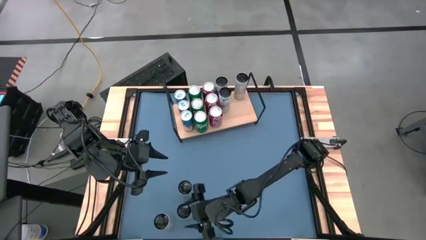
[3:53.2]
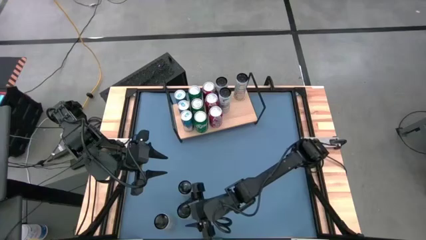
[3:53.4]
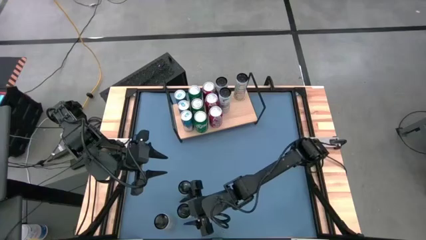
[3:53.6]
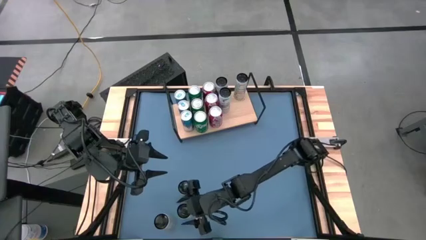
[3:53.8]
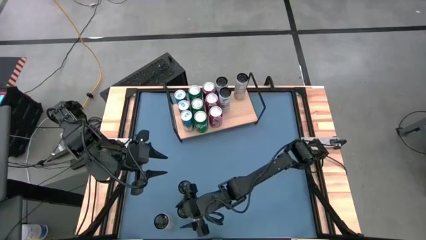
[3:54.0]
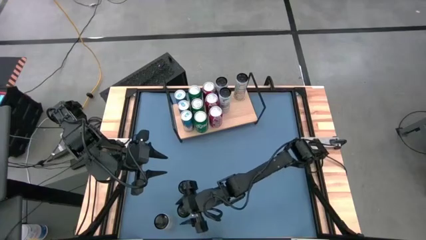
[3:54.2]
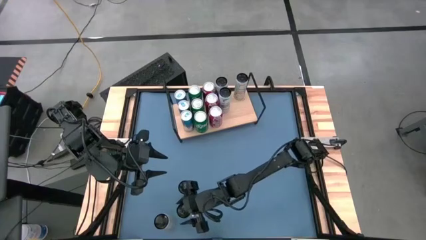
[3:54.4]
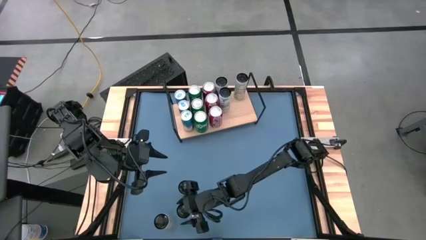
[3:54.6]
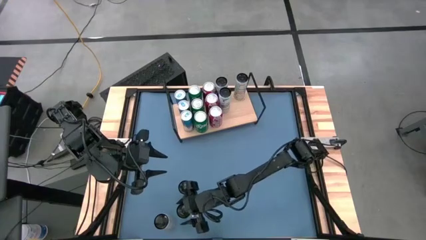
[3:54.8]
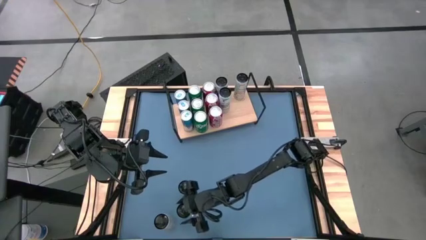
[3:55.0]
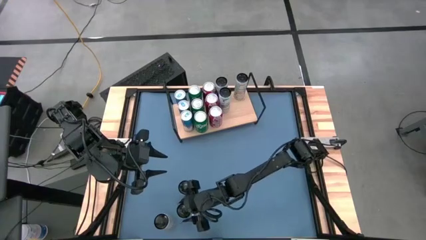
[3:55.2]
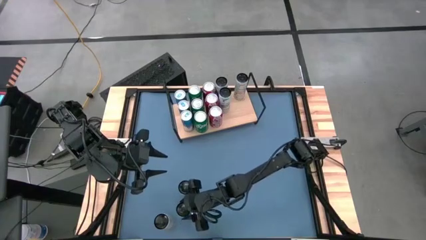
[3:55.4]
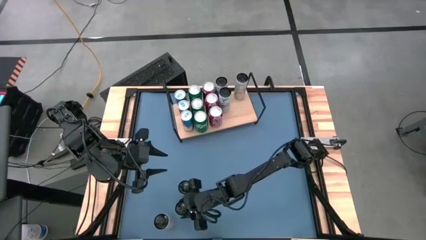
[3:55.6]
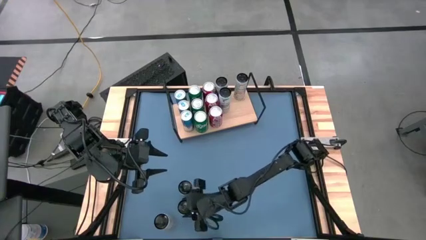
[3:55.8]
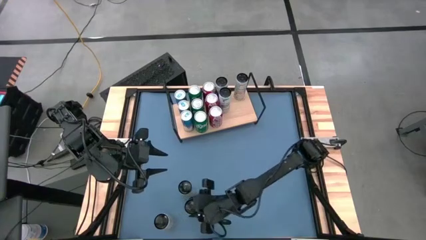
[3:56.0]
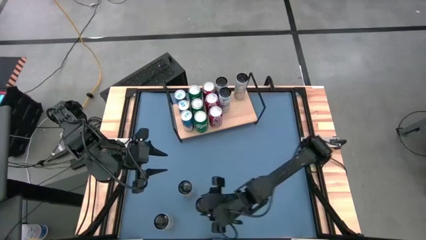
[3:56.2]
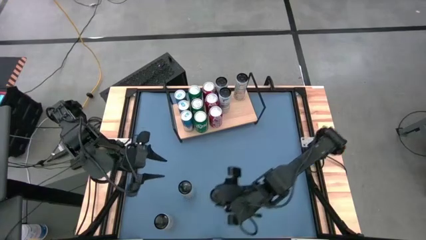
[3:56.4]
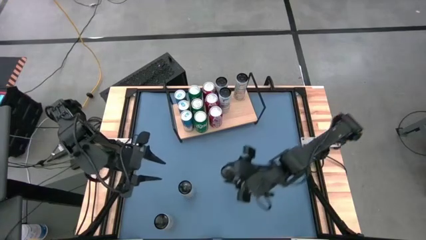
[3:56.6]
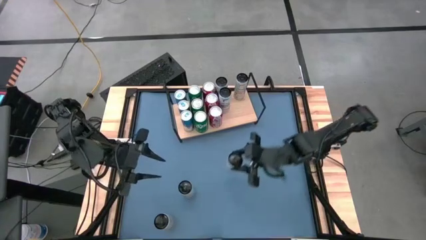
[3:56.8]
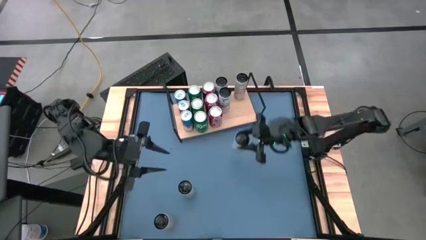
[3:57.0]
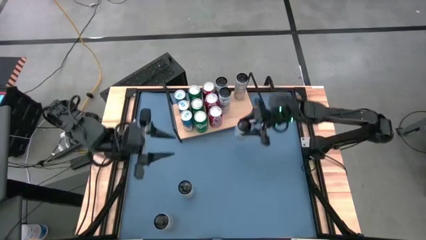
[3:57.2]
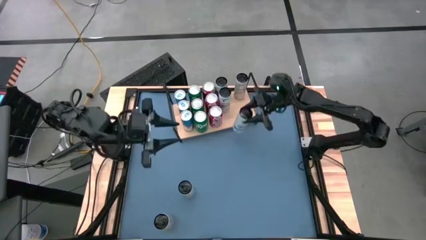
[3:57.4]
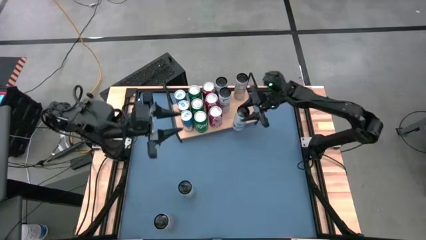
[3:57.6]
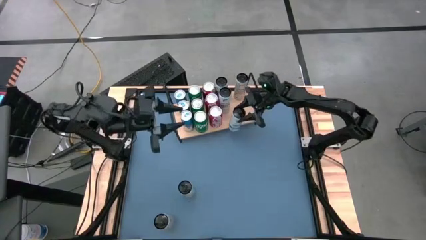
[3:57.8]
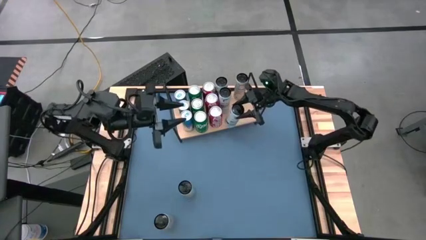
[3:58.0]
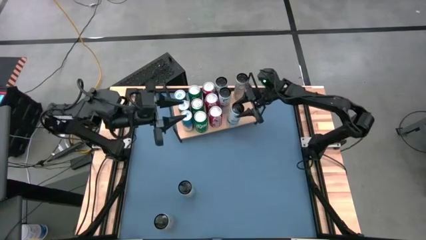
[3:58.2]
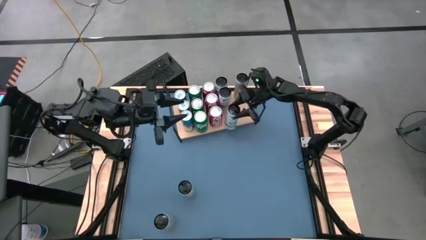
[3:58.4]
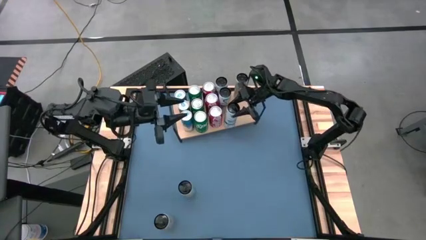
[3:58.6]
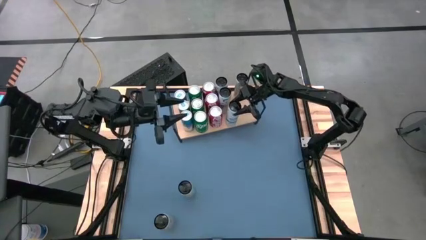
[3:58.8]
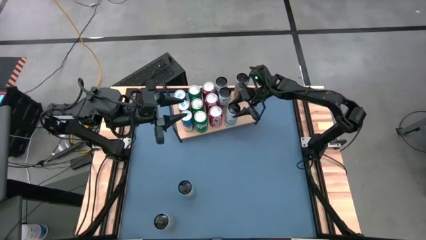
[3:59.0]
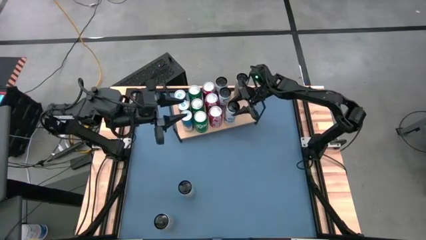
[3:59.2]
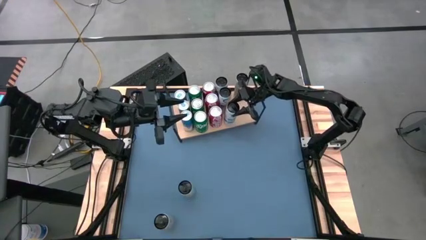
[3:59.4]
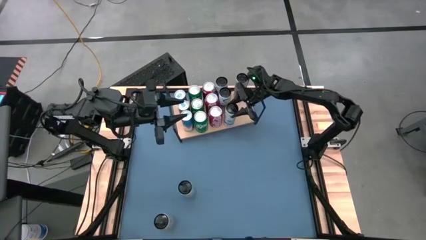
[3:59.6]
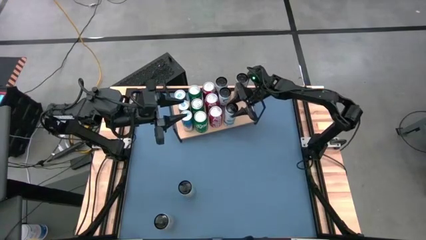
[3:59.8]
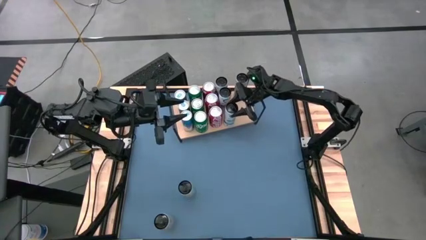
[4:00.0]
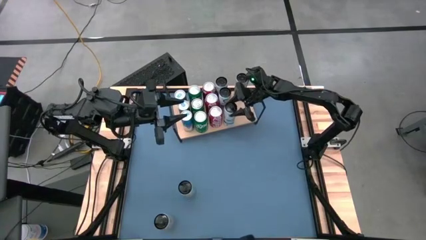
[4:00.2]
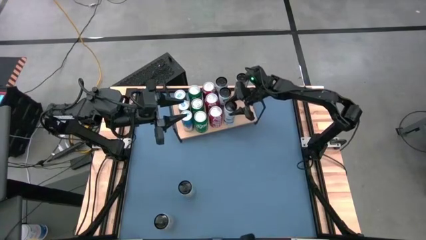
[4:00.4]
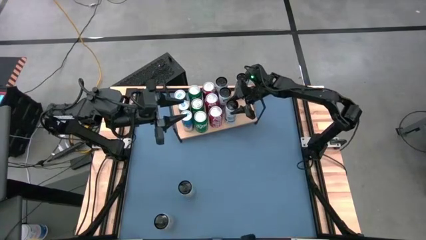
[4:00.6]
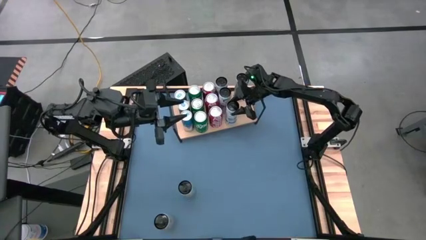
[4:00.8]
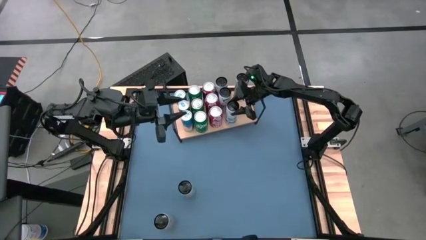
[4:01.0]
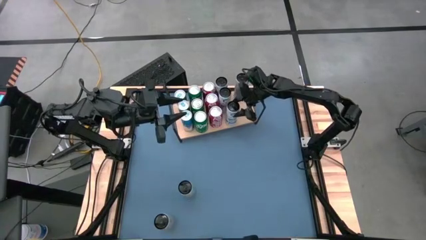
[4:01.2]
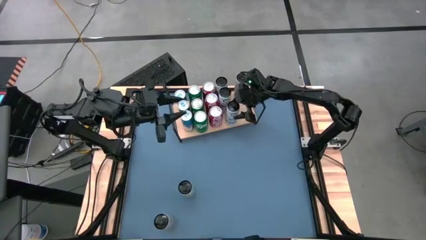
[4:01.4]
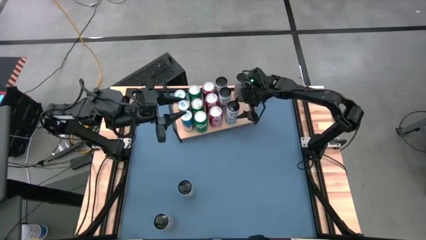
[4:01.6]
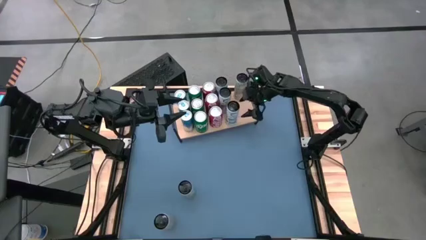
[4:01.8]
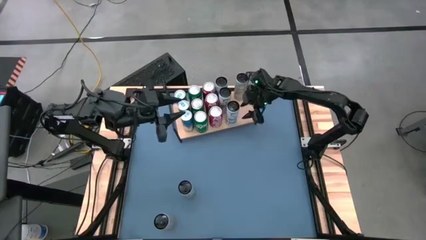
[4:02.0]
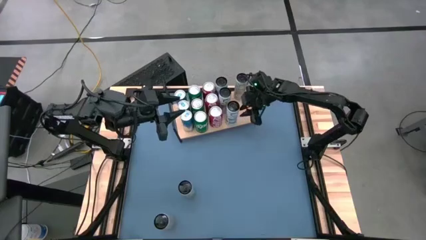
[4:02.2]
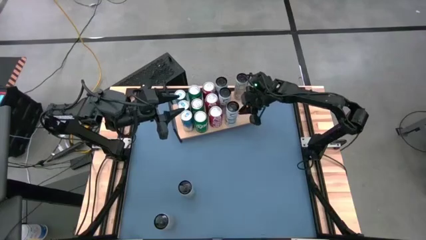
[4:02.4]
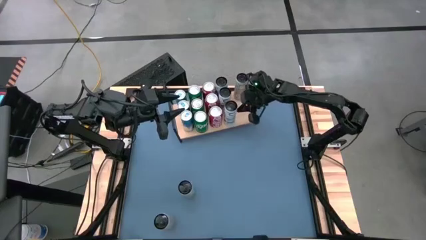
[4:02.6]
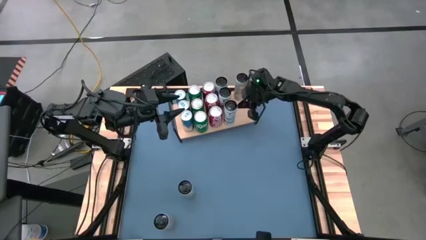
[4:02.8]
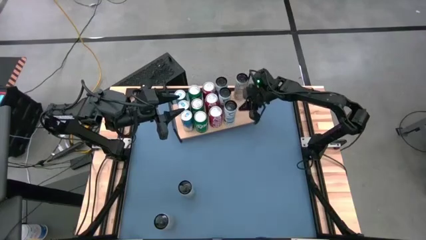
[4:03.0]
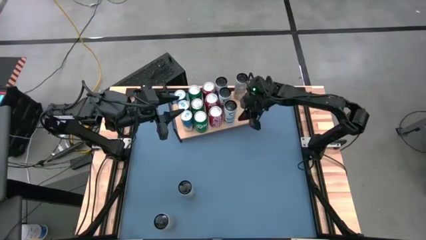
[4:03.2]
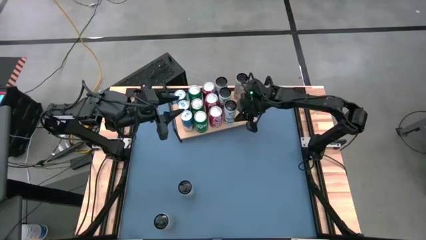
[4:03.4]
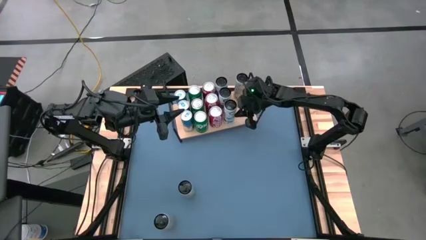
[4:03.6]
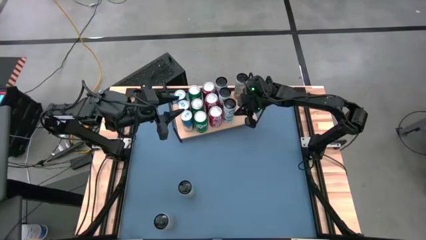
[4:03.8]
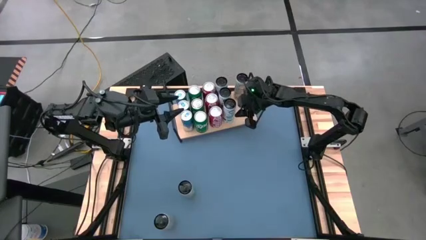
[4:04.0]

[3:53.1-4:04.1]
Task: Place canned beverage on shelf
Put the white blue soda can on the shelf aligned with the other white blue soda cans
